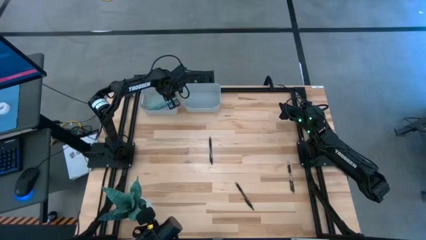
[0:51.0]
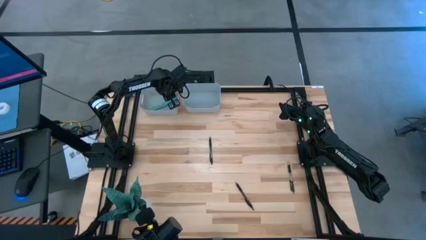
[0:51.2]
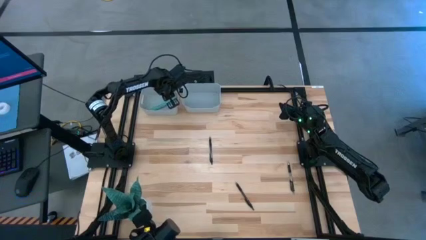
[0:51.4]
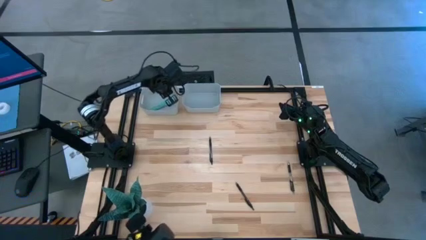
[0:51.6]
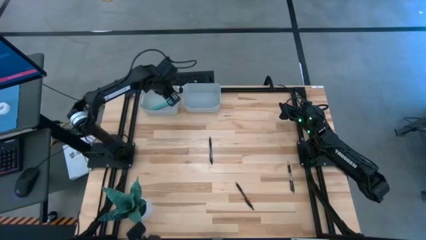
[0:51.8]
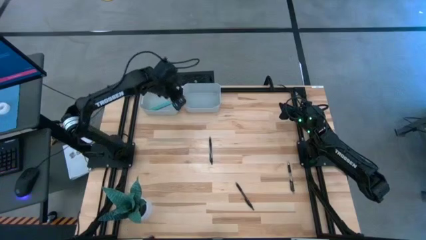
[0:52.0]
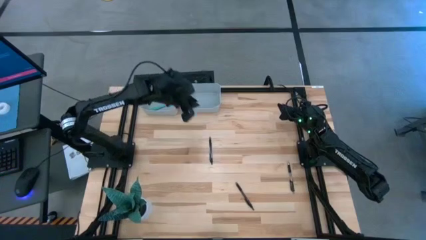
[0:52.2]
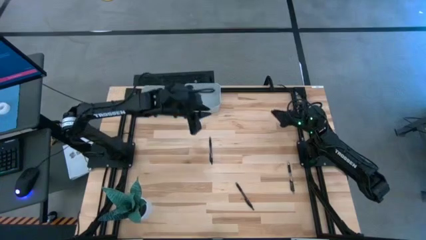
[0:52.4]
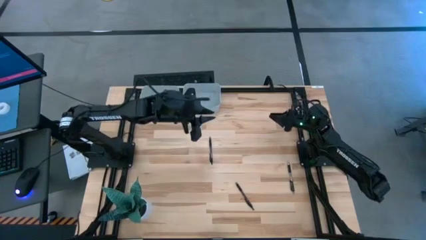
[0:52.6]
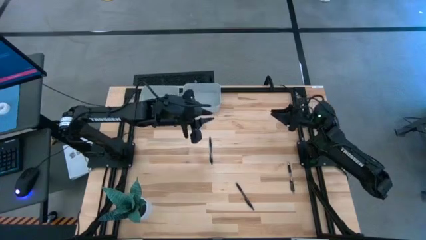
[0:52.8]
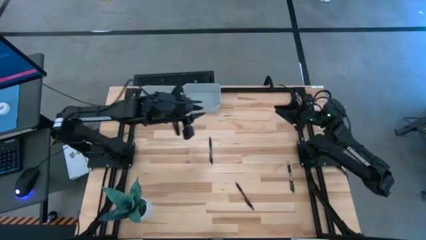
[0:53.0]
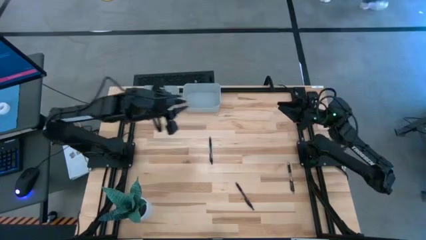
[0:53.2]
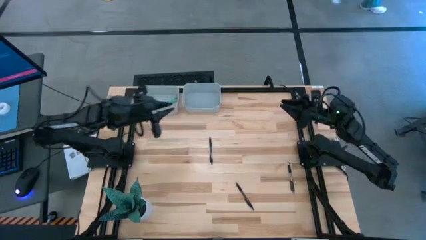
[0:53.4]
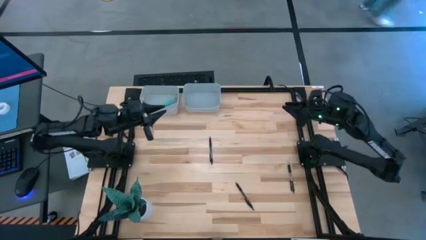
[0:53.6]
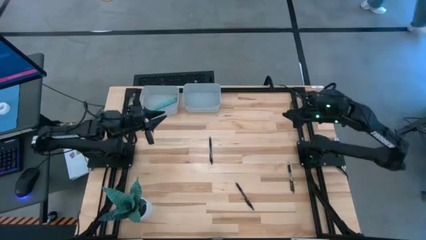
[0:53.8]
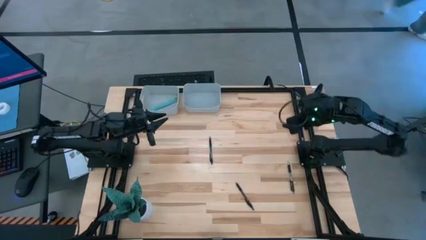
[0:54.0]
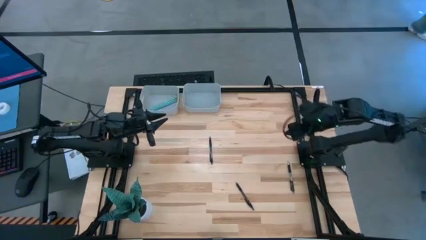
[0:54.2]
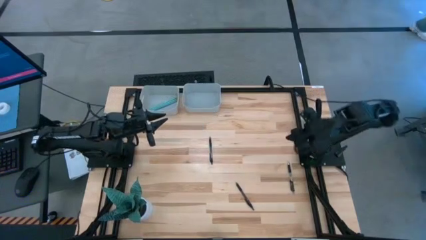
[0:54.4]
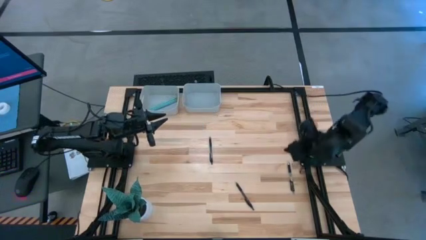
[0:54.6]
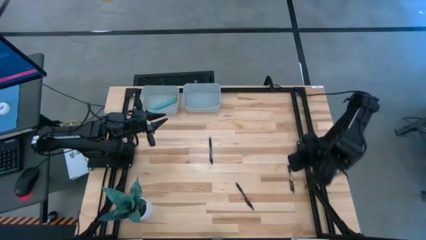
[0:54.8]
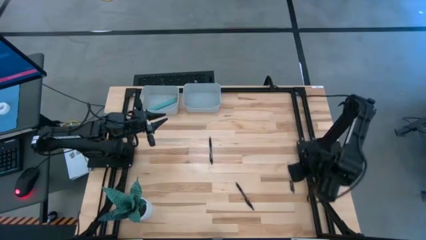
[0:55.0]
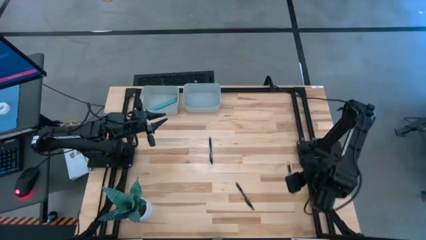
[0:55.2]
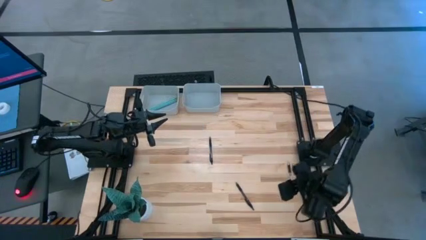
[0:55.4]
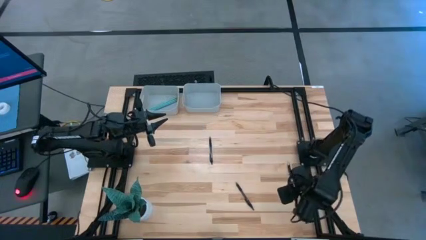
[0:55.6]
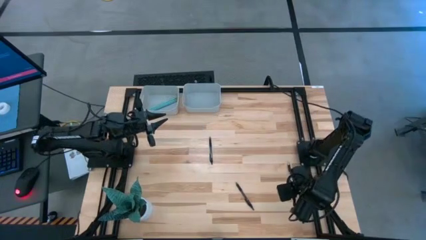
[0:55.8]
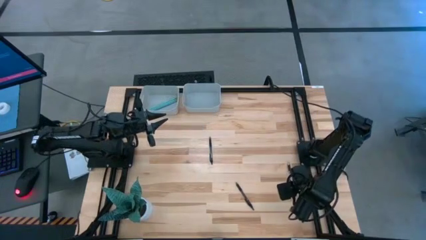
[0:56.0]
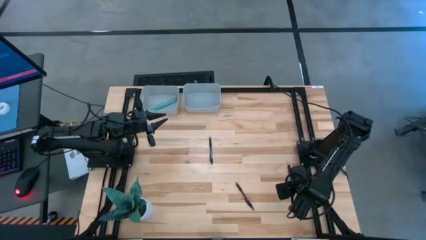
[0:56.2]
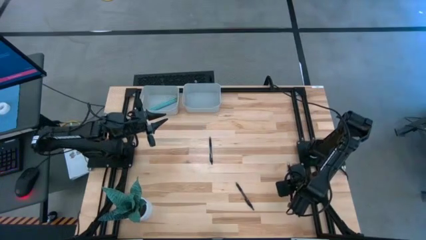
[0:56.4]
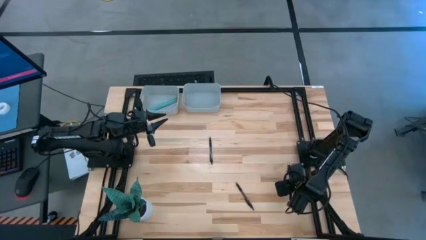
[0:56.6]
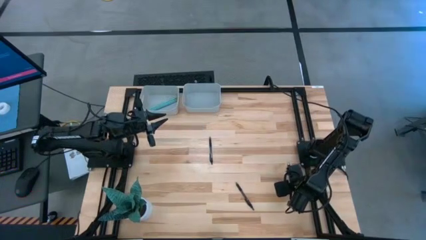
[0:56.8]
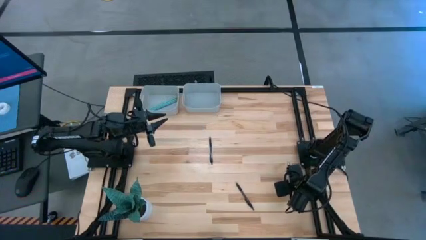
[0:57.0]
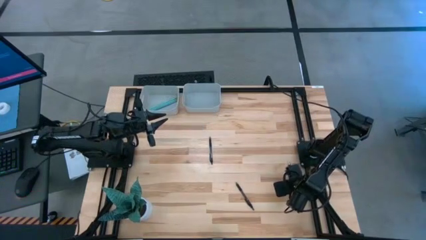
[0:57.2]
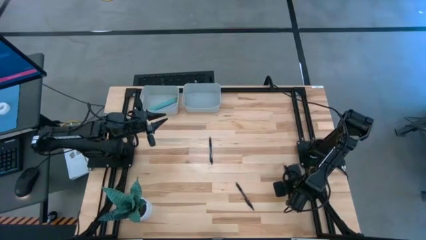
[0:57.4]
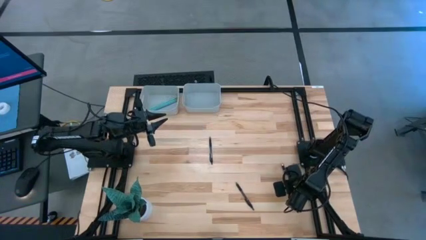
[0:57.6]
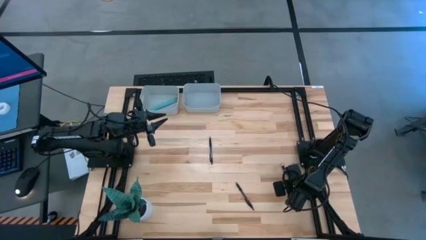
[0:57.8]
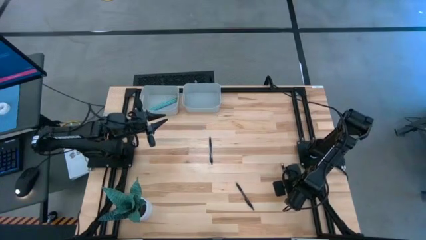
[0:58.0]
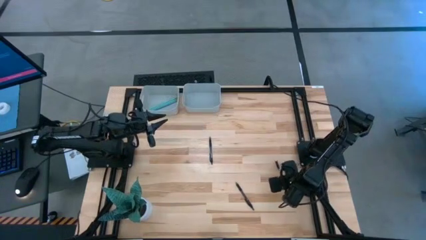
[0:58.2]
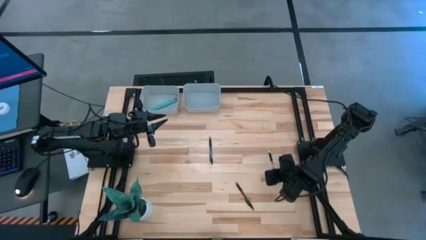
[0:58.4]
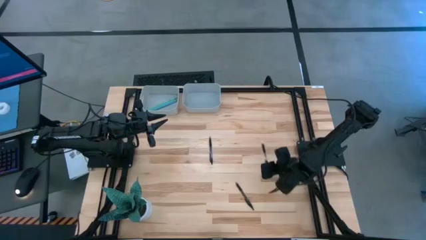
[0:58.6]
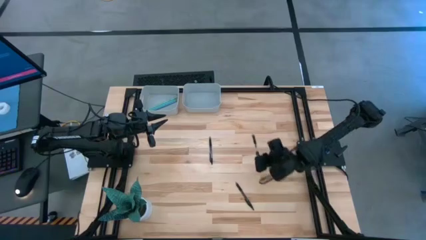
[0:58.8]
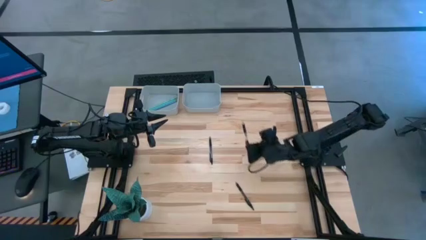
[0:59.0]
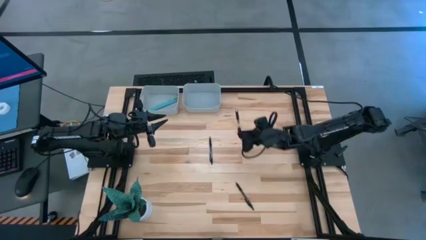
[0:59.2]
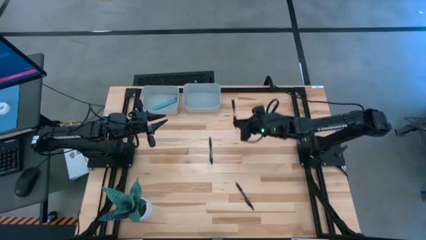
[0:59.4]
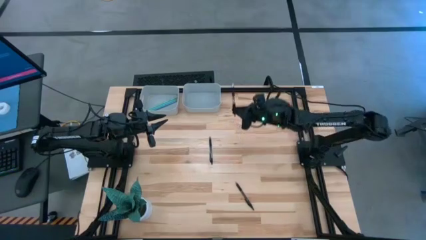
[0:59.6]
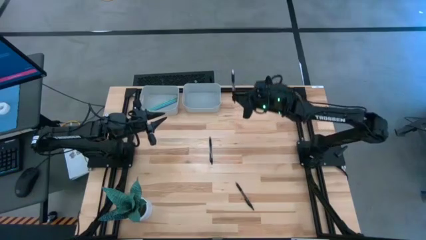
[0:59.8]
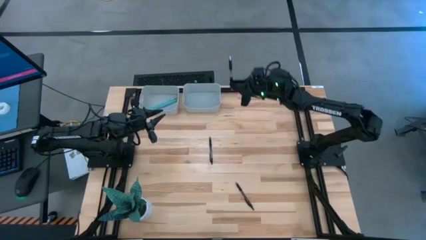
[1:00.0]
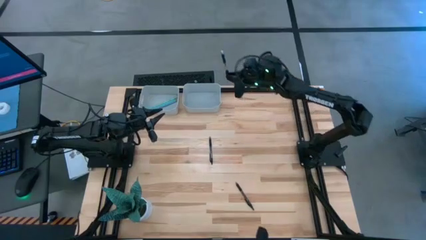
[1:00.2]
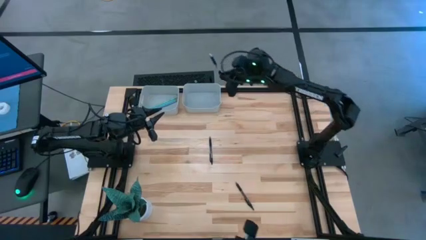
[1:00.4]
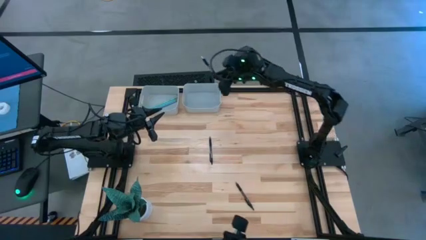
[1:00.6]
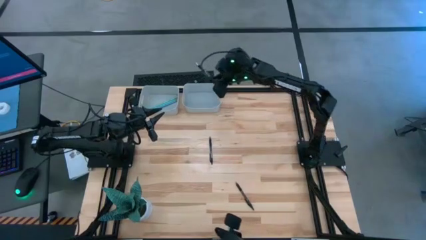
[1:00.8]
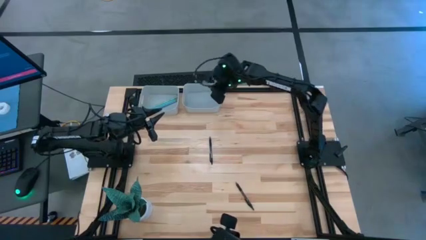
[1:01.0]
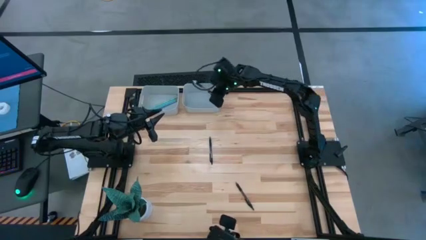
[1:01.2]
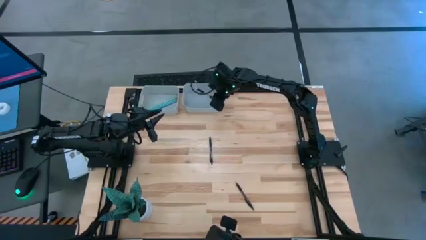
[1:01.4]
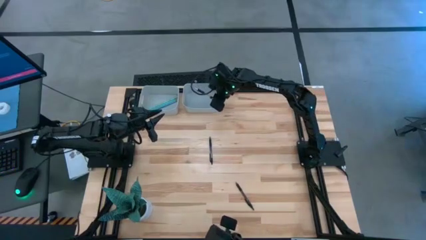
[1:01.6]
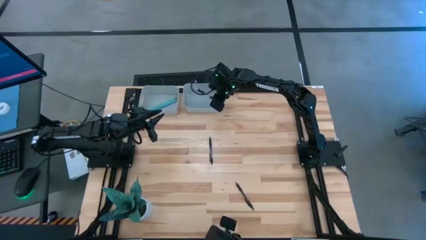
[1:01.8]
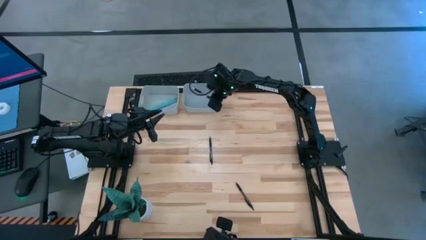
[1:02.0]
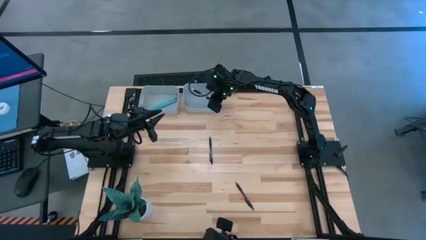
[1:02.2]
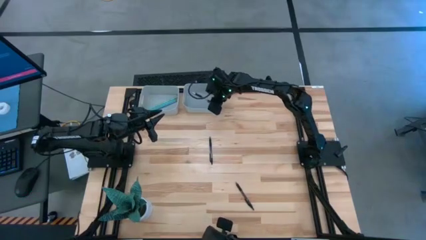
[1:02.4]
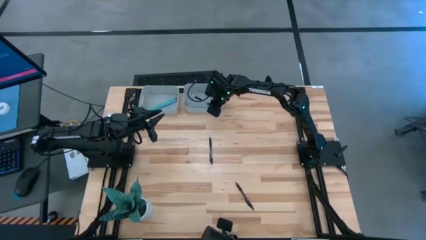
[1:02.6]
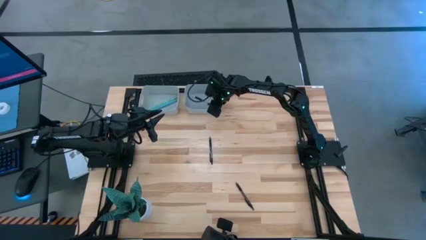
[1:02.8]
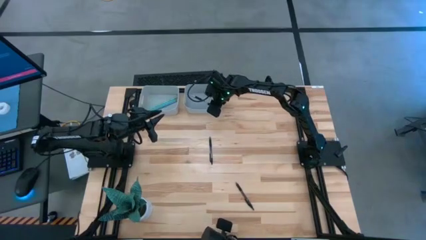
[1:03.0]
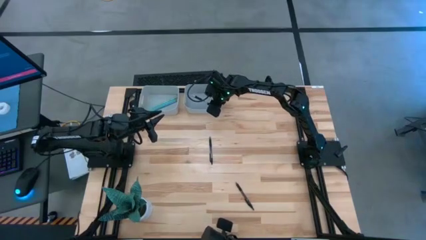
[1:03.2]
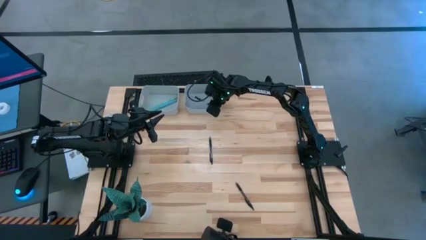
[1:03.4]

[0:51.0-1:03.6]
Task: Sort pens & pencils
Put the right black pen into the right gray bin

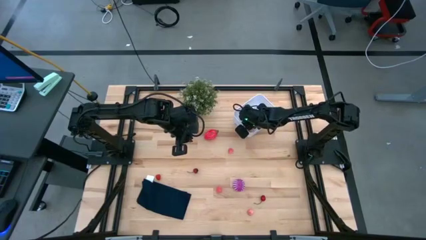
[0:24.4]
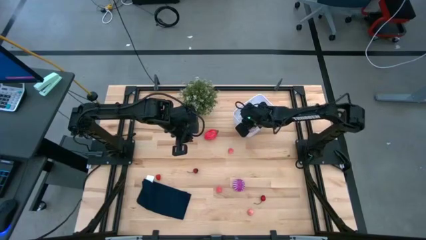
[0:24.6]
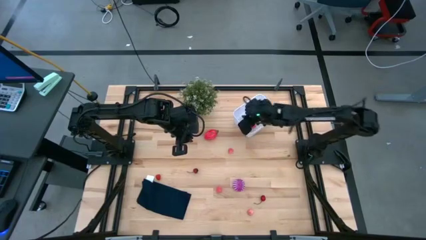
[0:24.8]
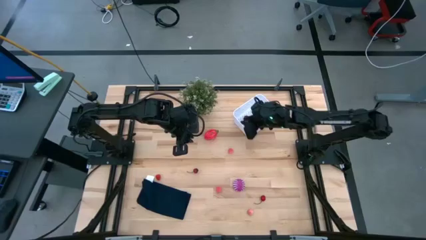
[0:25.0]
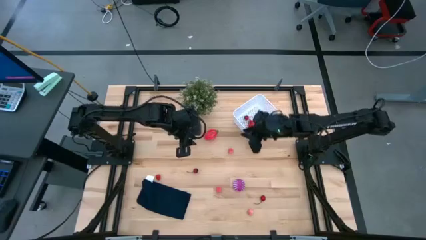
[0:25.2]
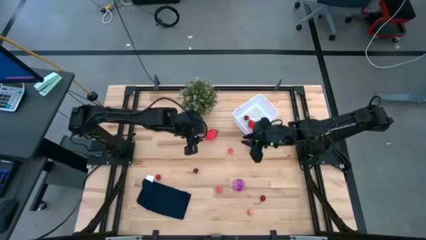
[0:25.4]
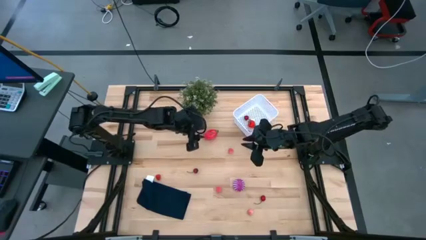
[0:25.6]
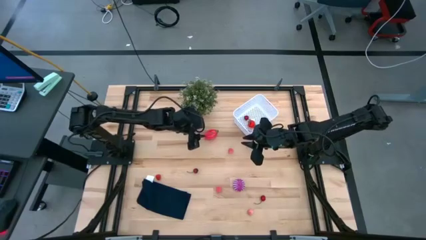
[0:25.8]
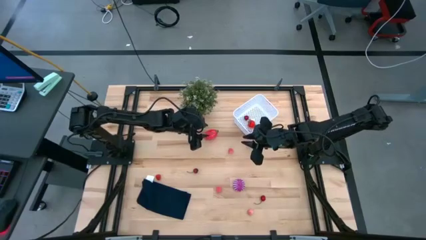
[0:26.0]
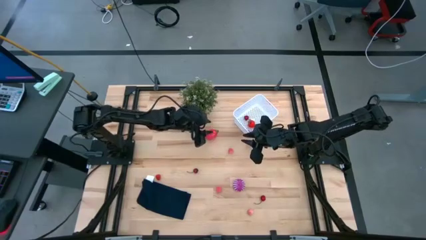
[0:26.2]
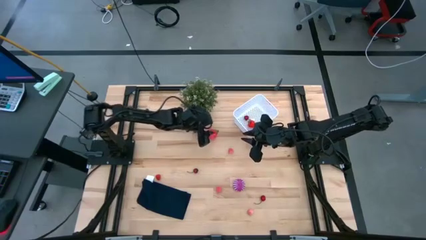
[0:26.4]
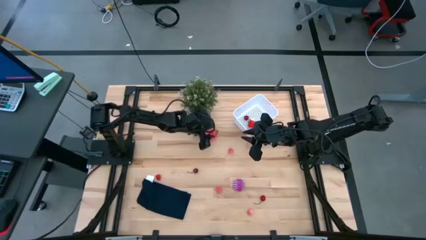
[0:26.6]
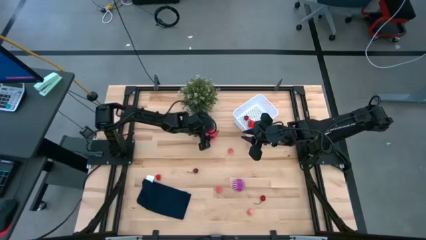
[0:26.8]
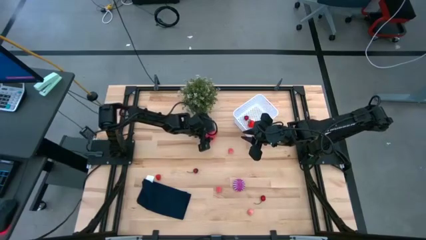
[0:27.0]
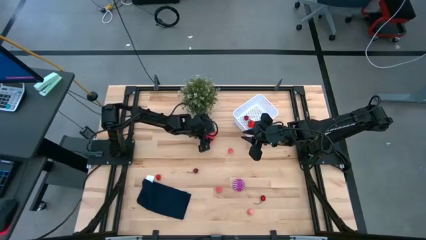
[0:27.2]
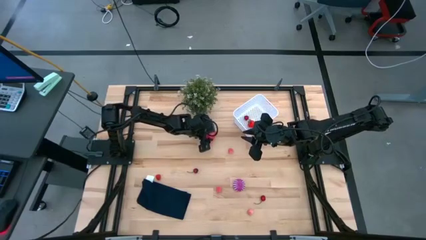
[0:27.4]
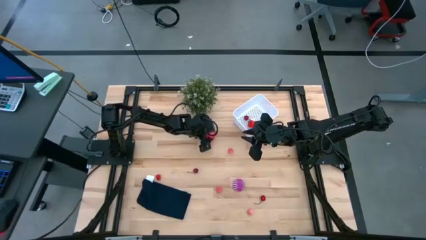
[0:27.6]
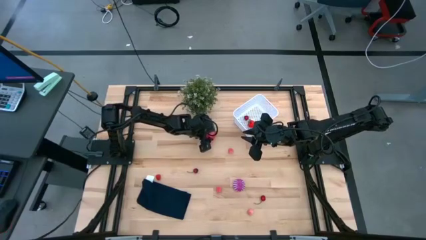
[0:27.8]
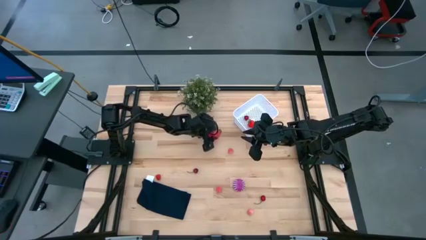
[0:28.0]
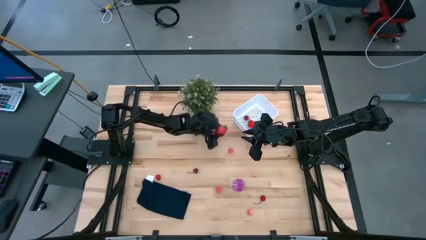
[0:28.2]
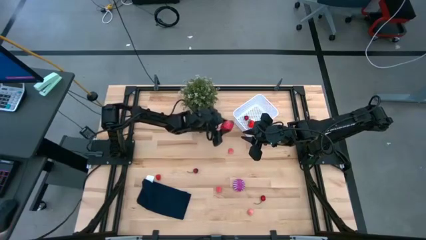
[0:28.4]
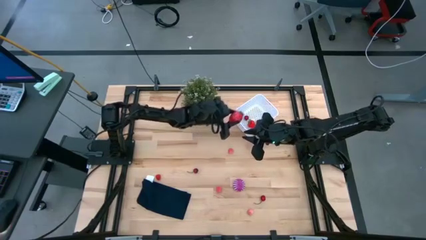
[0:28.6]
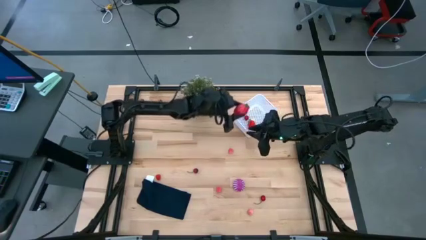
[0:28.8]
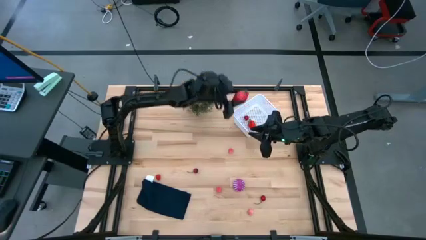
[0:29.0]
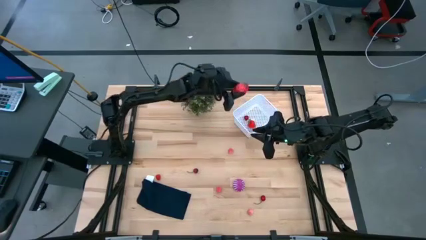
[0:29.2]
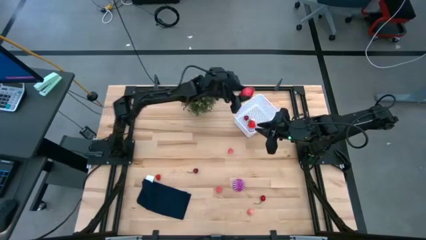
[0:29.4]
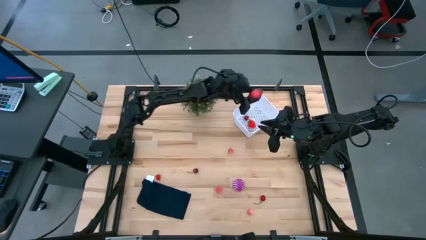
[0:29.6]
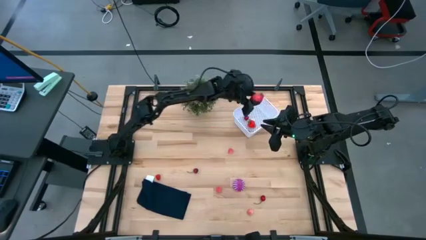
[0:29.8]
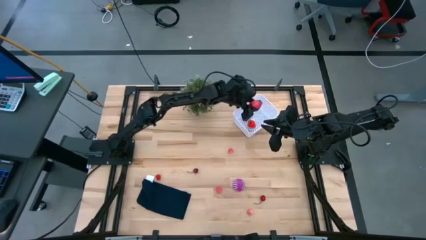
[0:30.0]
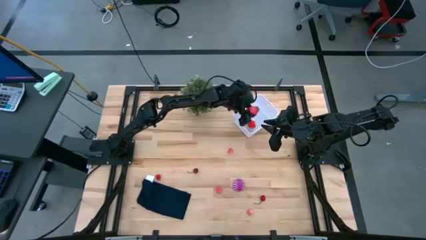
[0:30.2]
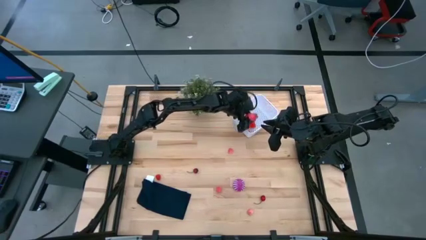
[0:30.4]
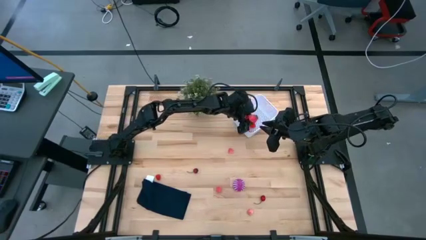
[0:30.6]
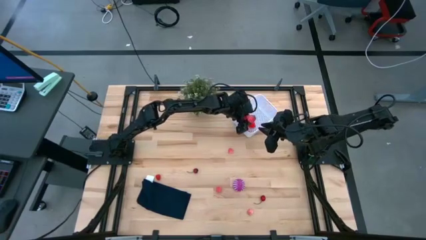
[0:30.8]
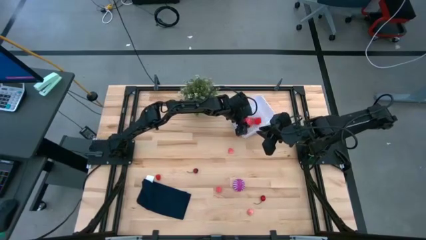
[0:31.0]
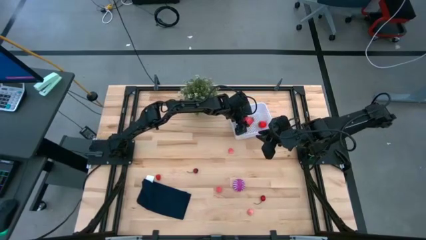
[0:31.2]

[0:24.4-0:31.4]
Task: Pick and placing Produce into tupperware
Put the dragon fruit into the bin
